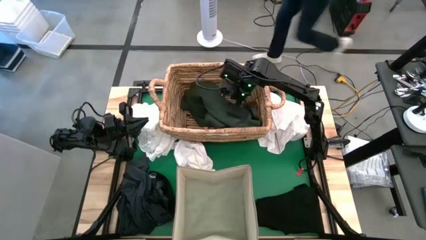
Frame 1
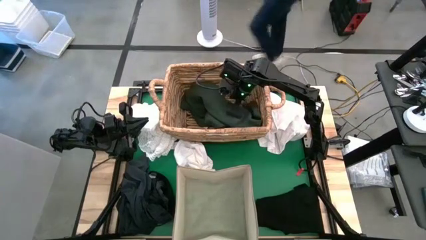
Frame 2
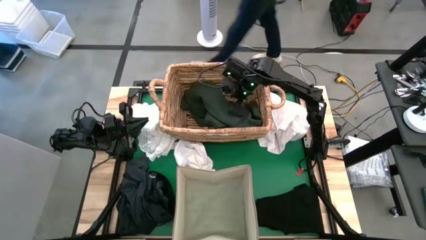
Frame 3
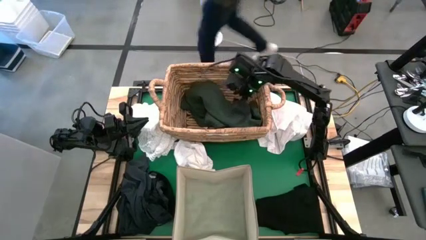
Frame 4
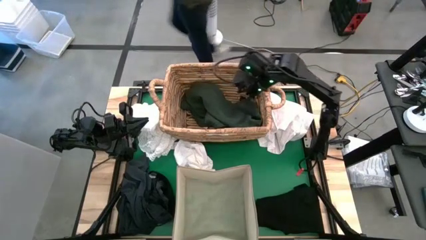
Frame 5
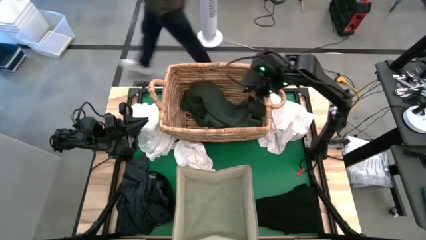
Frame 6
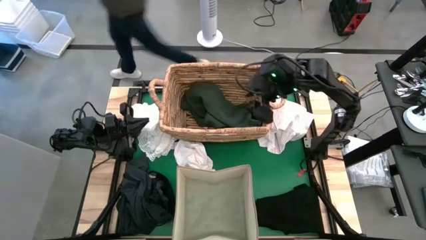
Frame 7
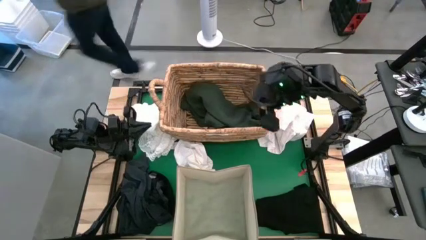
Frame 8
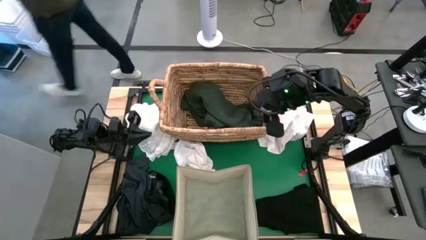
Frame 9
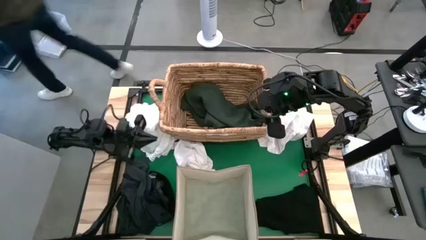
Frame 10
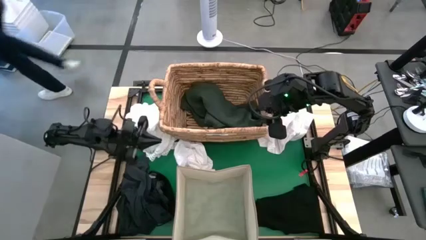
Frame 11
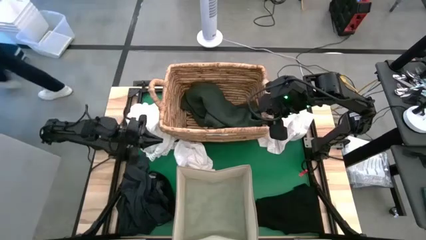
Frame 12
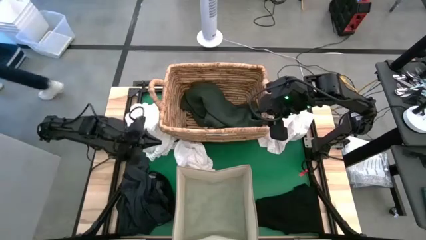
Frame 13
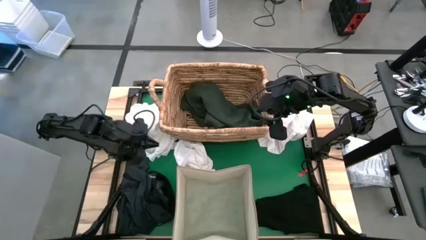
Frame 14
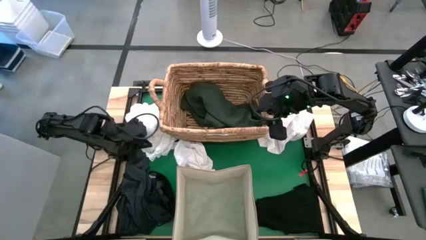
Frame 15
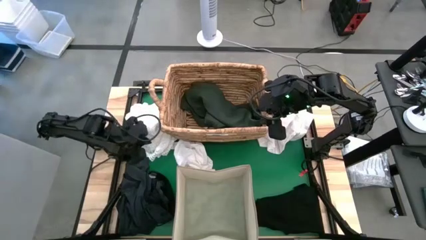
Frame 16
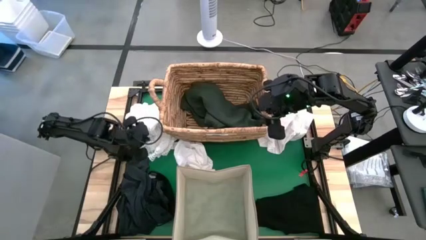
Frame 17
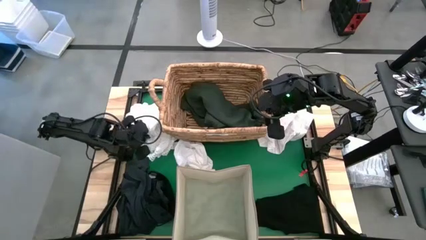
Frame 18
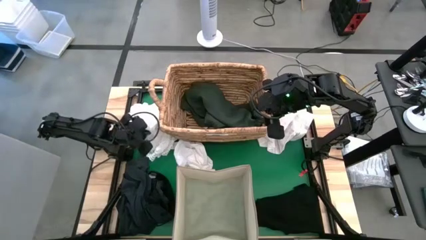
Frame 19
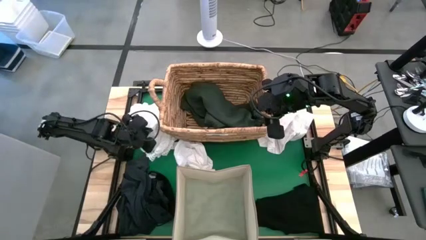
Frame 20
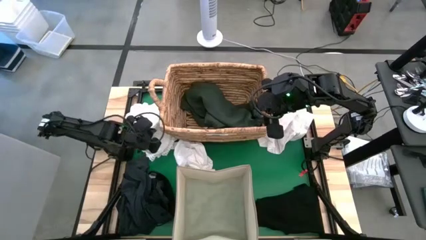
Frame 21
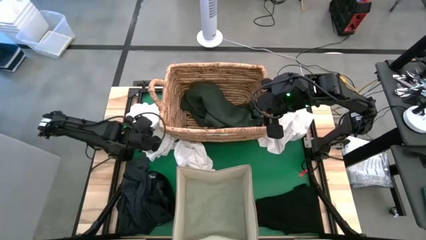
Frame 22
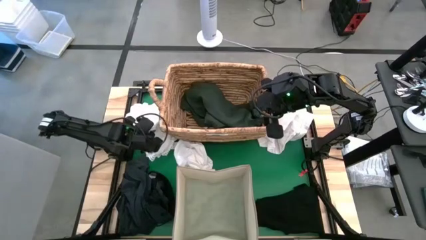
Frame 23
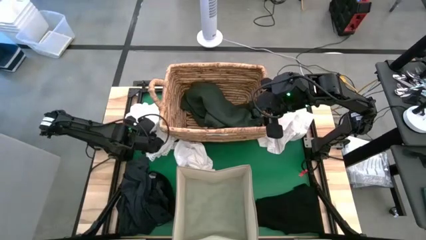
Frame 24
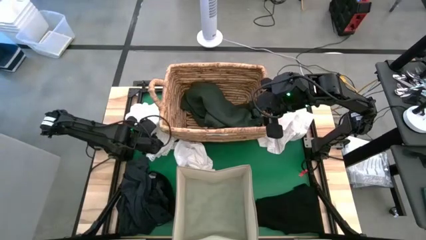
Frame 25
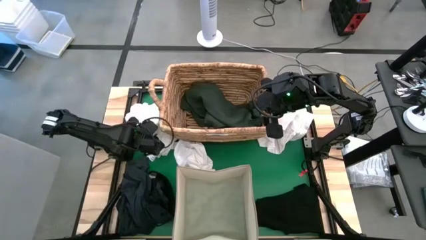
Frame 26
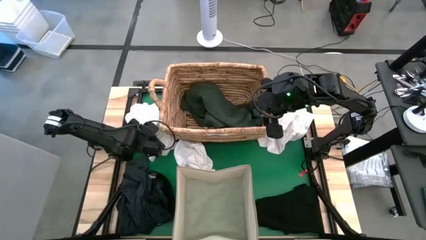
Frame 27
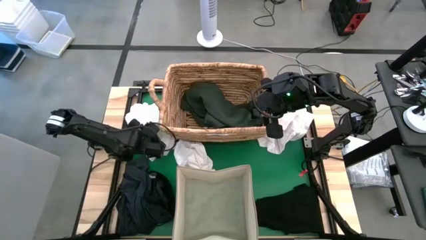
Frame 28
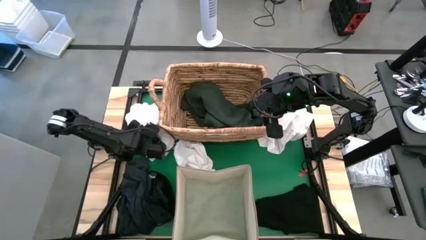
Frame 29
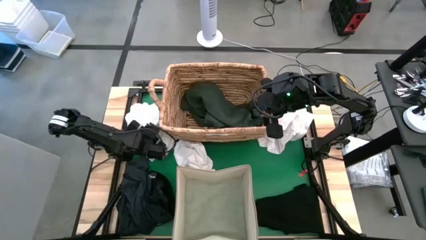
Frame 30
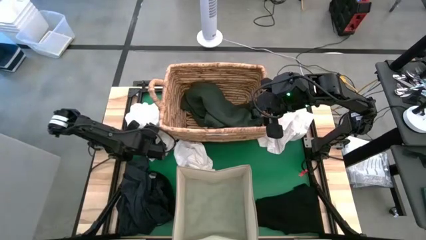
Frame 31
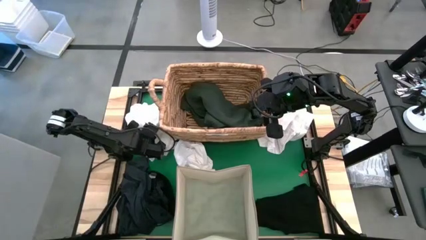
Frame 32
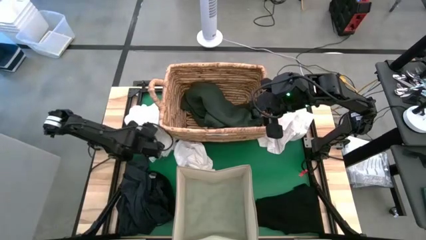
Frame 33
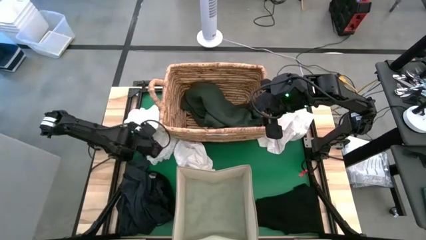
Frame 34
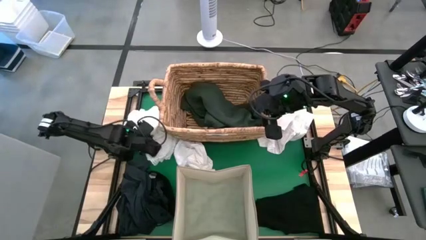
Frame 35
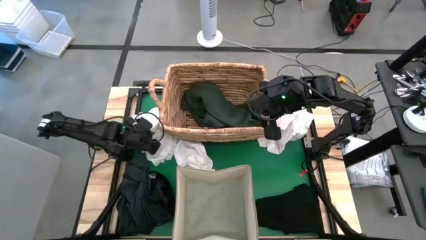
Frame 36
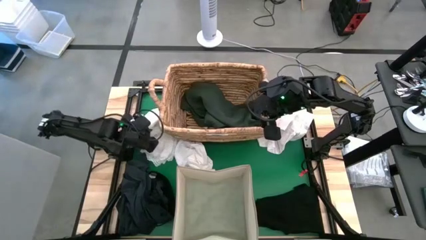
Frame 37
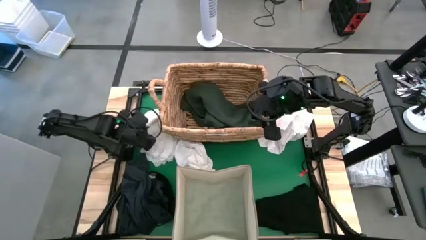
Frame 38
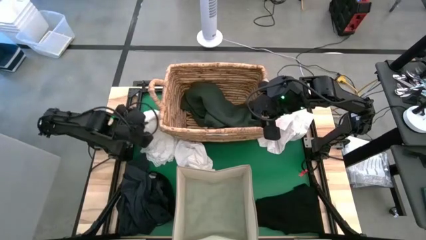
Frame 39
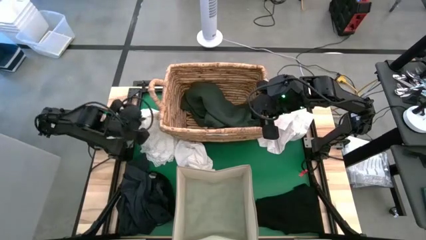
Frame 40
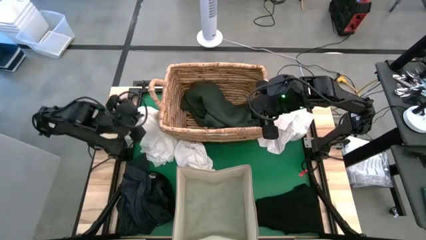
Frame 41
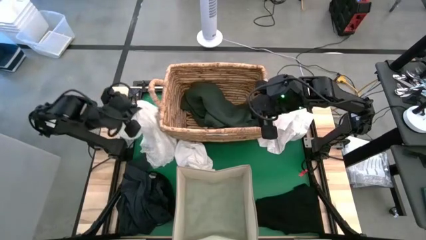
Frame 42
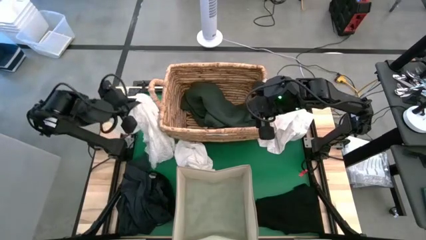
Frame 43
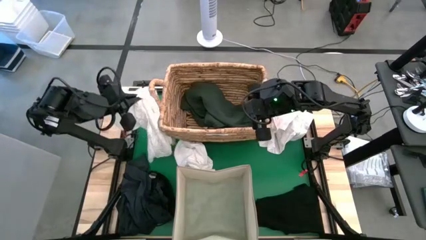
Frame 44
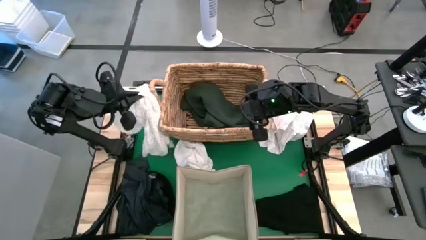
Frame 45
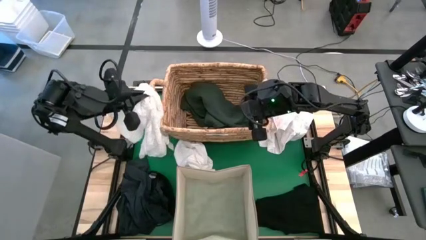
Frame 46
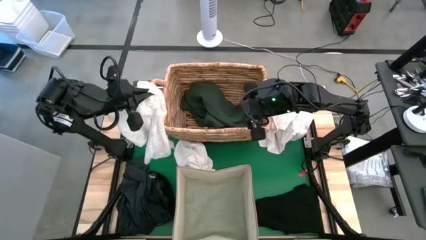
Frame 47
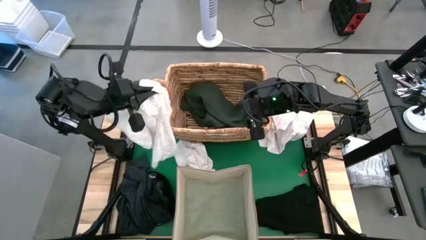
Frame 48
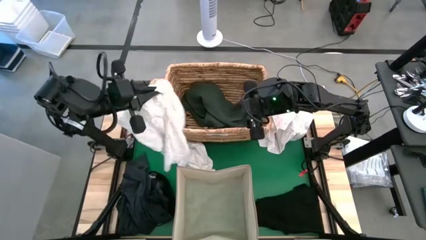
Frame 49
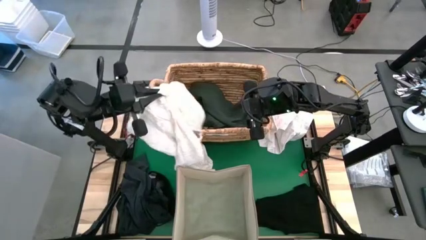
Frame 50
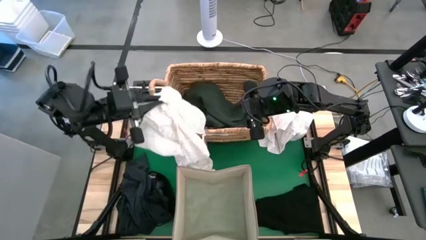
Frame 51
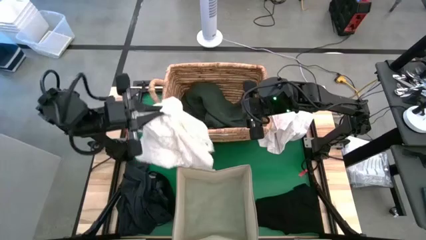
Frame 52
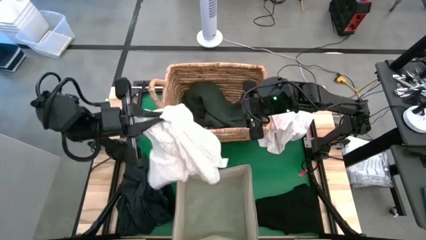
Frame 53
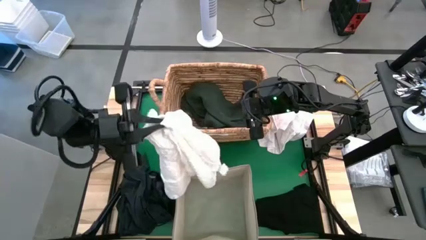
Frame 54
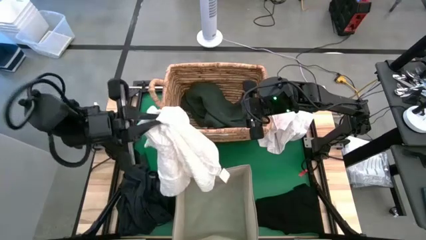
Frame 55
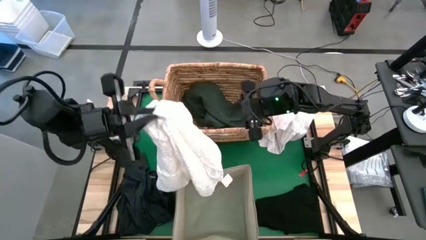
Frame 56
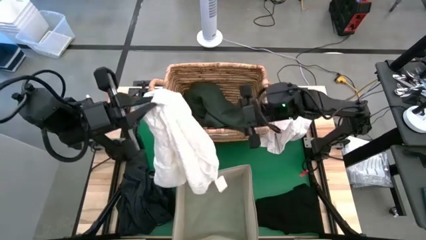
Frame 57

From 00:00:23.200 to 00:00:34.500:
Put the white shirt into the white laundry organizer

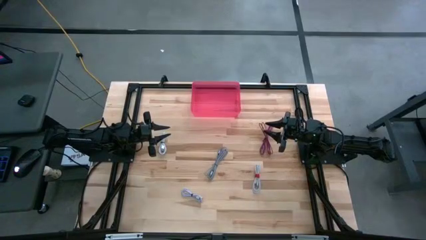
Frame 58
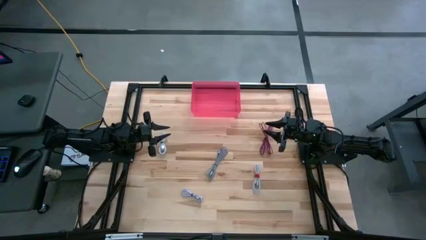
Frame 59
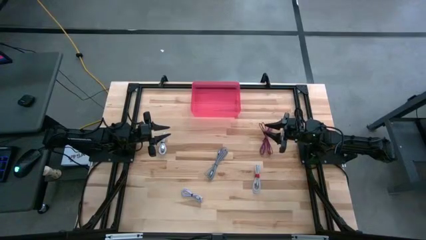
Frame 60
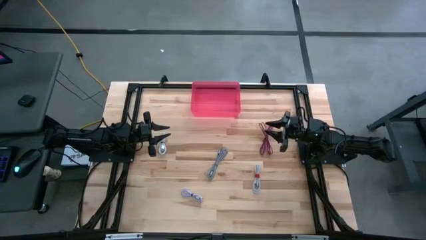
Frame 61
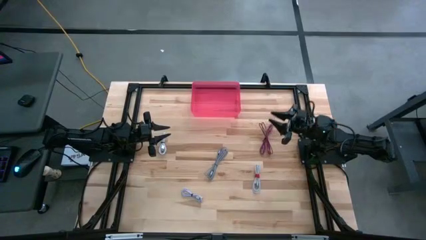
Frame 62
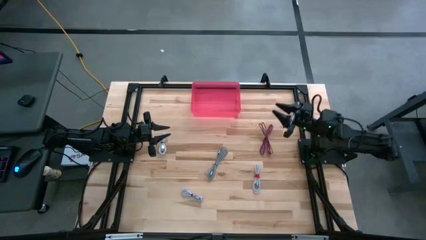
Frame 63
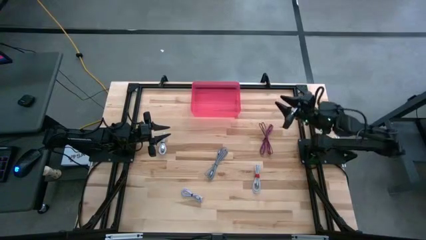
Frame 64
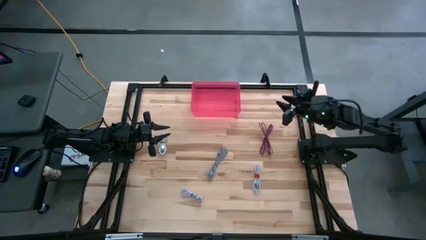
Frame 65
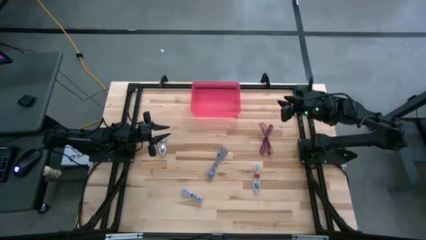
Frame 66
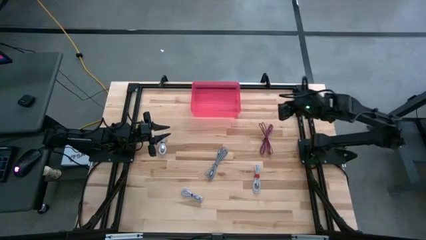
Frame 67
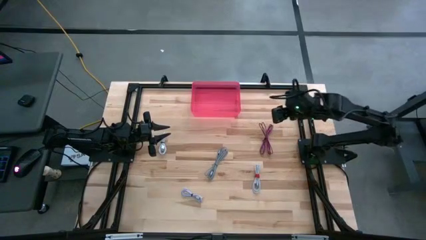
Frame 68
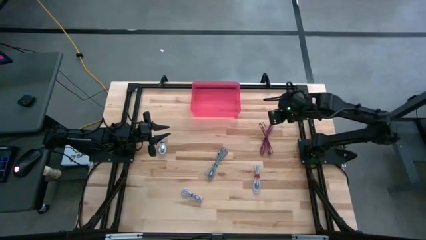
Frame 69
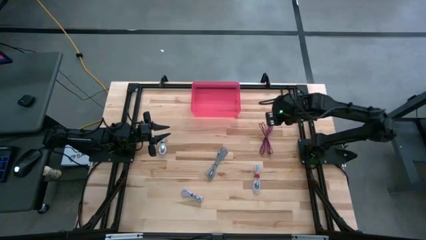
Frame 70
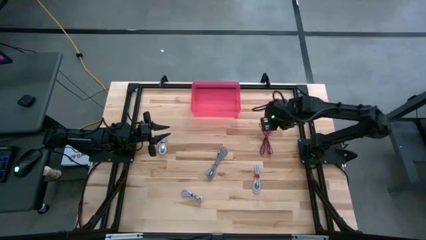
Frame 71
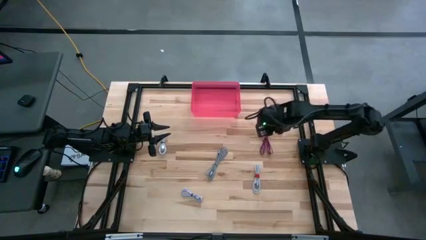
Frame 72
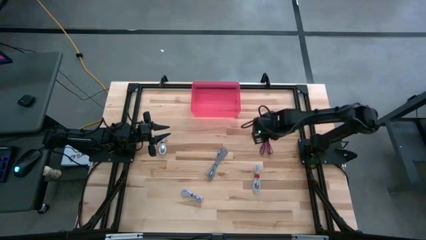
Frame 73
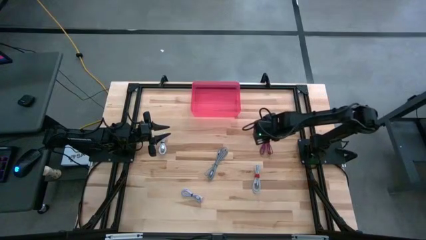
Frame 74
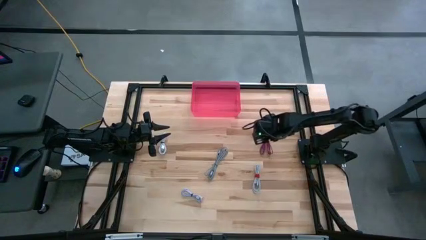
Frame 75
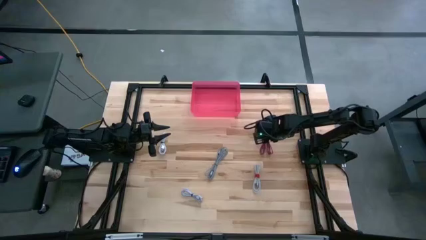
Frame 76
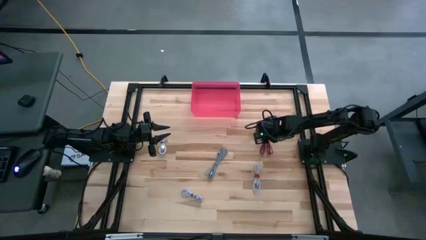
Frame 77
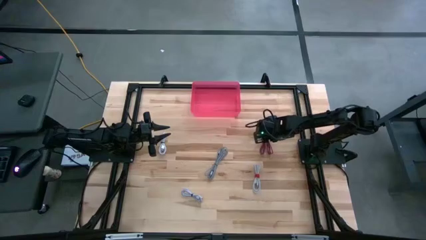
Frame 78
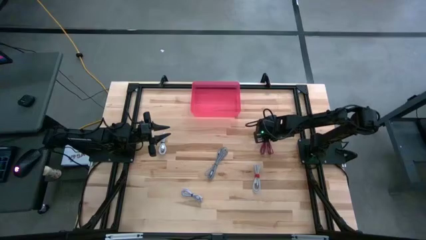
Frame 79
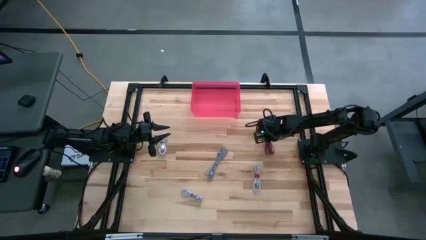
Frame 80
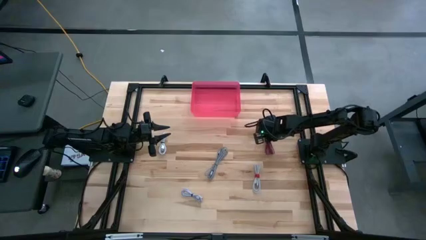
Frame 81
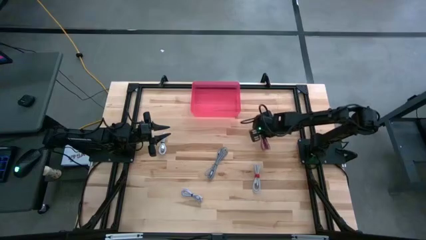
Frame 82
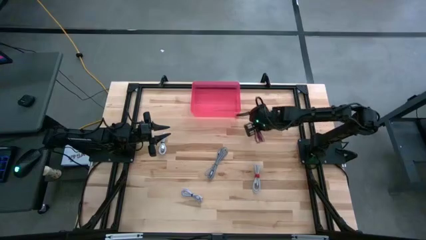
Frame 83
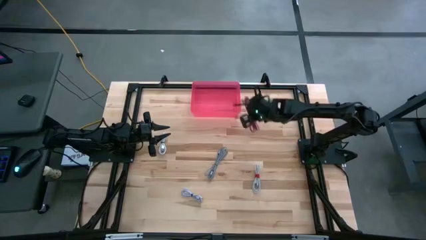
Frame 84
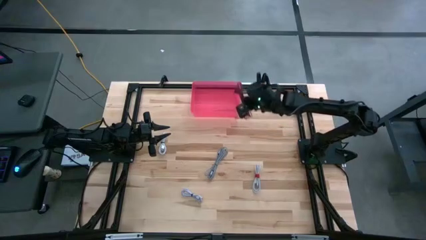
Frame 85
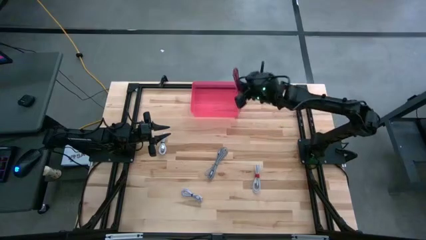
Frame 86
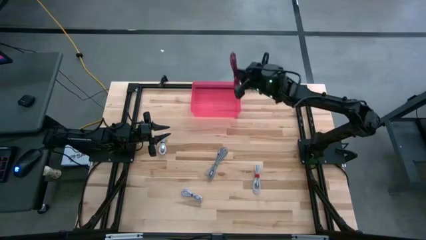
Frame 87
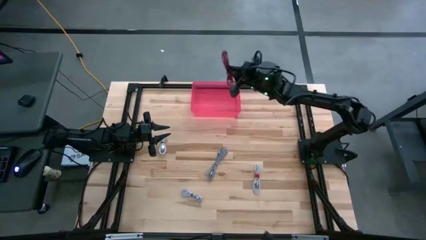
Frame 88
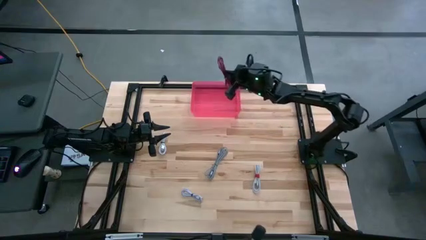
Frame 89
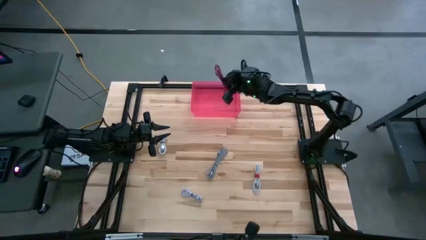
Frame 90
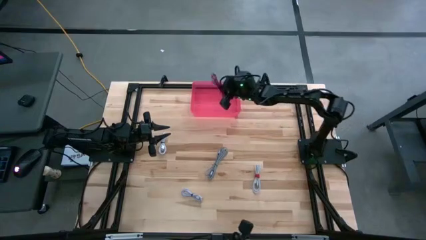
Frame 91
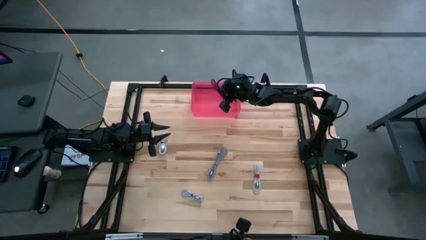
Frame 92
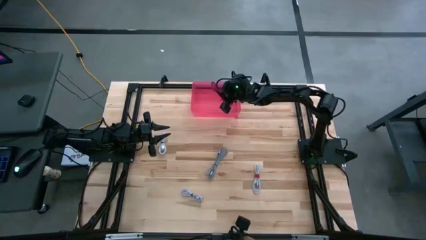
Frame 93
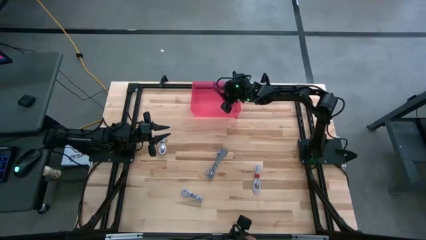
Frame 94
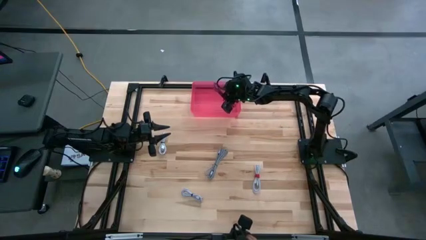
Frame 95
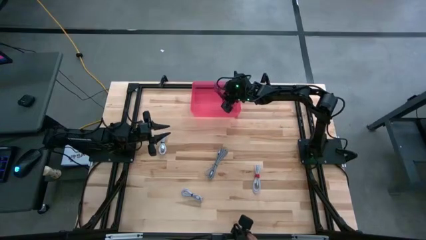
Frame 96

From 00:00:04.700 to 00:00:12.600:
Put the pink charger cable into the pink bin
